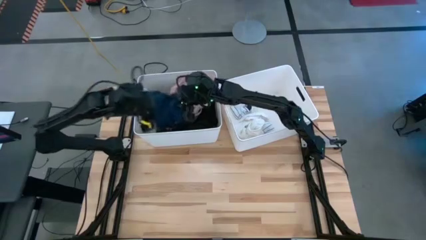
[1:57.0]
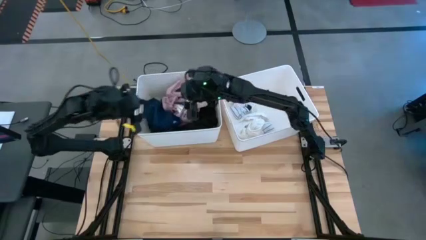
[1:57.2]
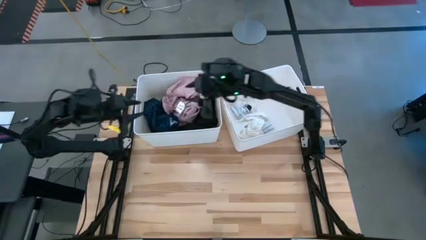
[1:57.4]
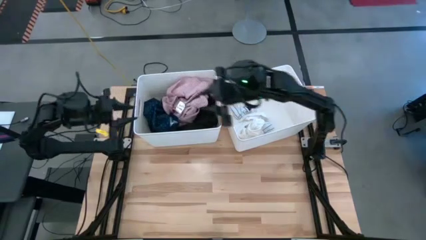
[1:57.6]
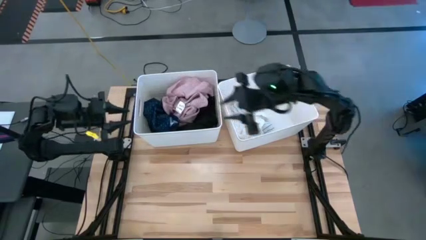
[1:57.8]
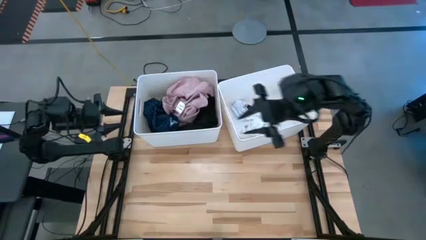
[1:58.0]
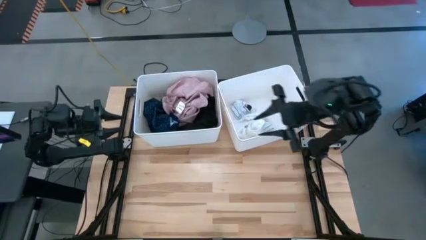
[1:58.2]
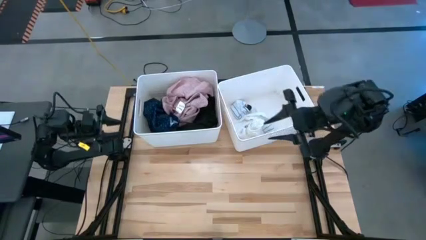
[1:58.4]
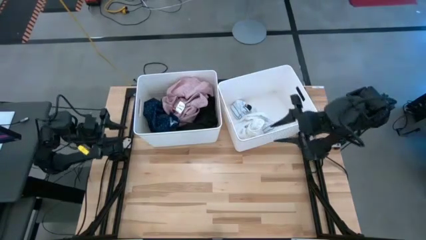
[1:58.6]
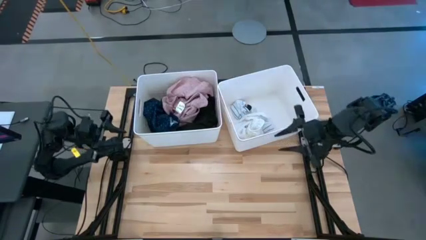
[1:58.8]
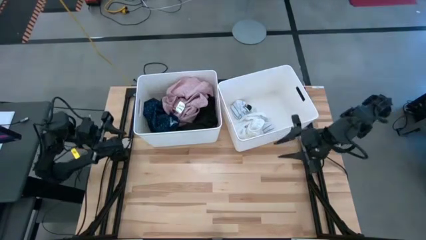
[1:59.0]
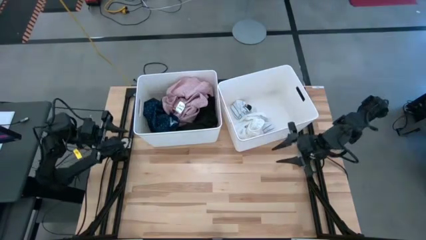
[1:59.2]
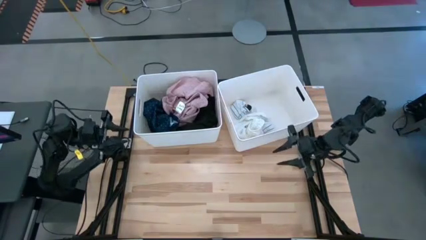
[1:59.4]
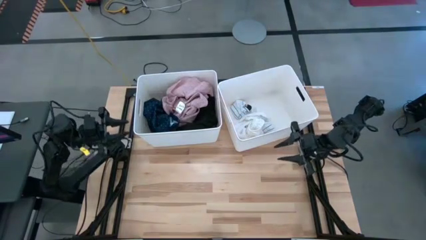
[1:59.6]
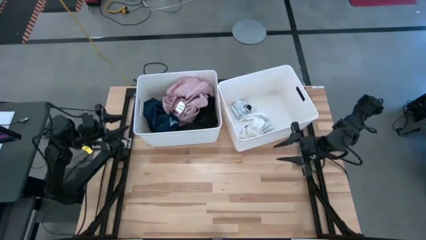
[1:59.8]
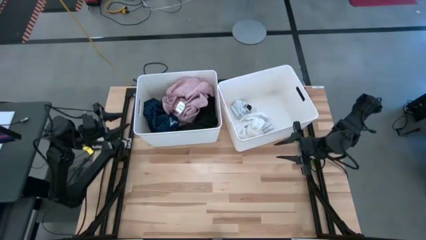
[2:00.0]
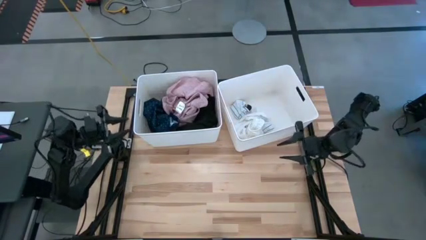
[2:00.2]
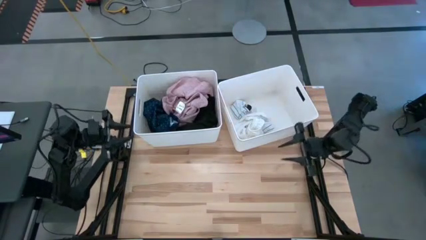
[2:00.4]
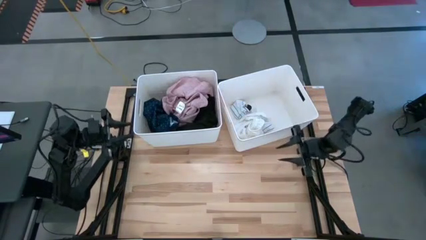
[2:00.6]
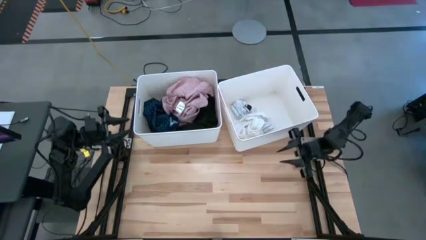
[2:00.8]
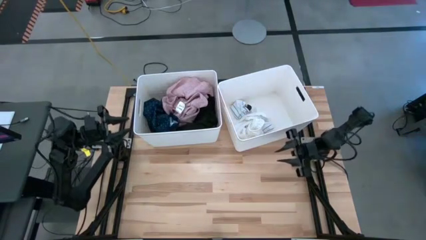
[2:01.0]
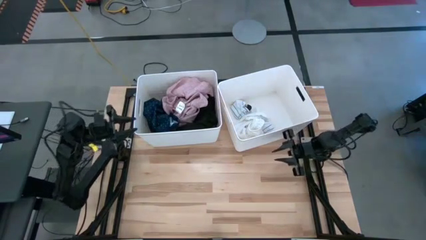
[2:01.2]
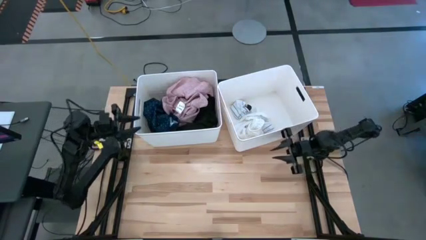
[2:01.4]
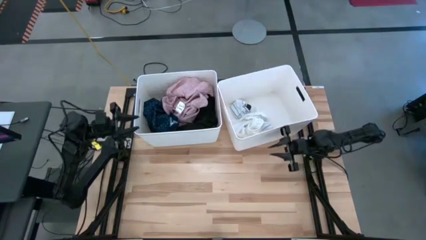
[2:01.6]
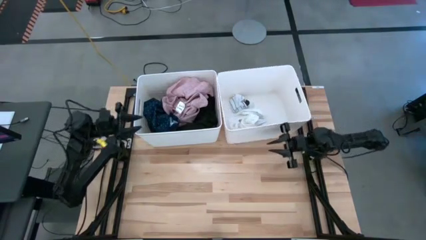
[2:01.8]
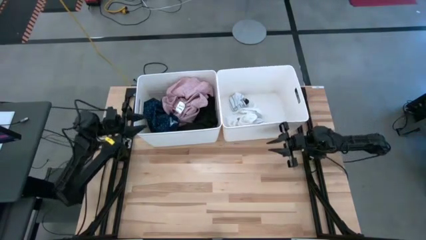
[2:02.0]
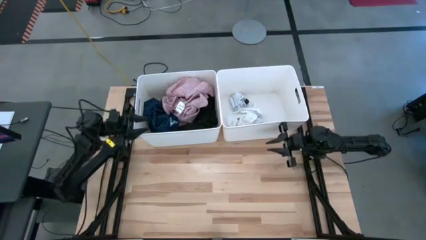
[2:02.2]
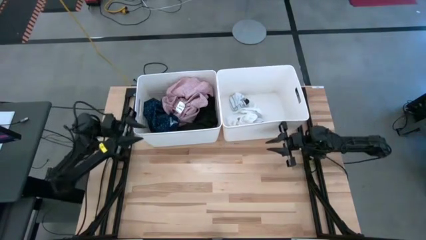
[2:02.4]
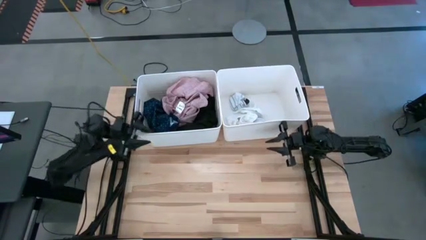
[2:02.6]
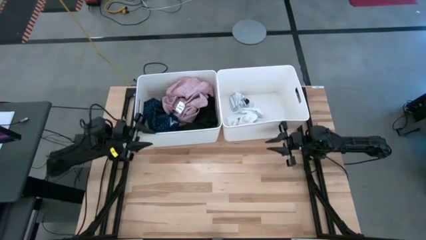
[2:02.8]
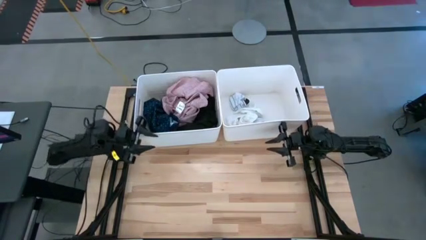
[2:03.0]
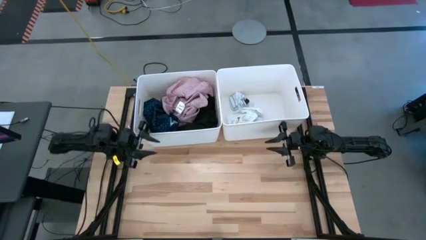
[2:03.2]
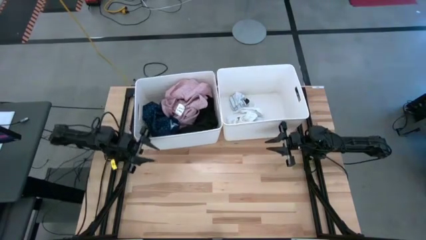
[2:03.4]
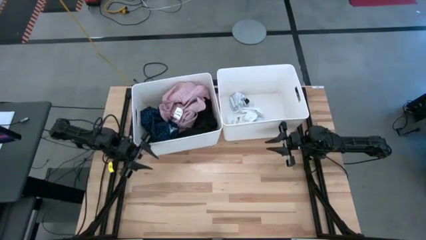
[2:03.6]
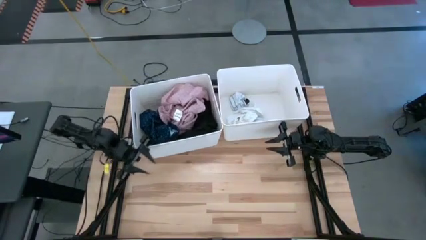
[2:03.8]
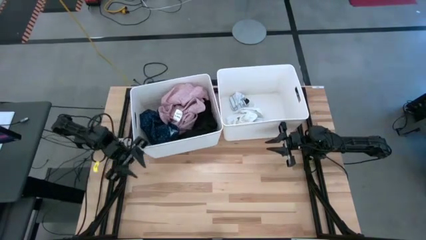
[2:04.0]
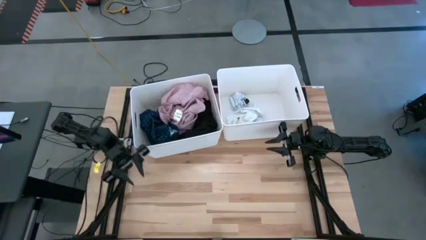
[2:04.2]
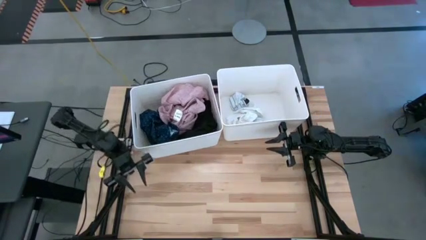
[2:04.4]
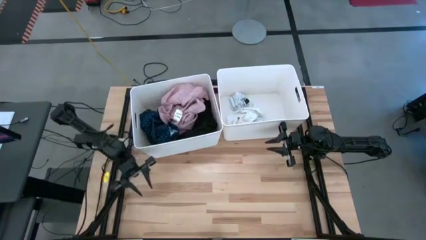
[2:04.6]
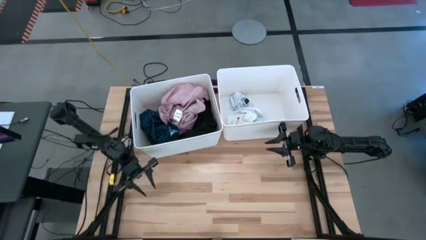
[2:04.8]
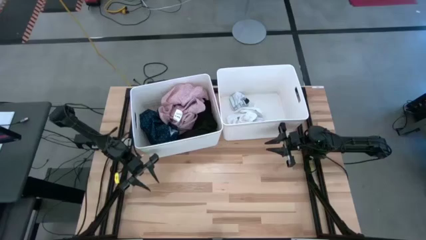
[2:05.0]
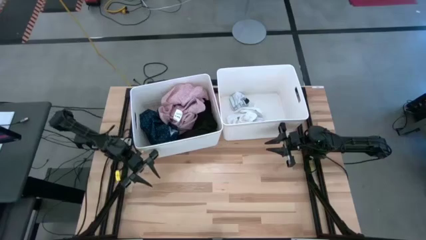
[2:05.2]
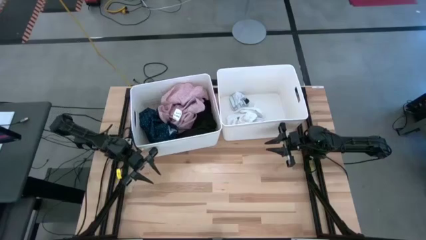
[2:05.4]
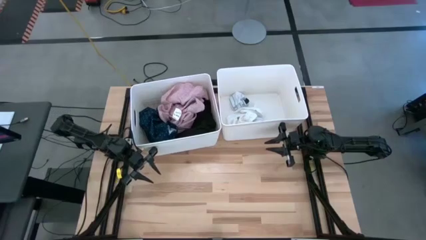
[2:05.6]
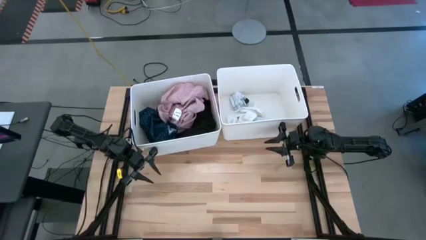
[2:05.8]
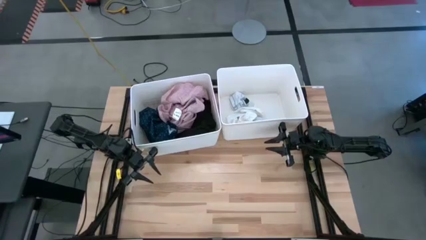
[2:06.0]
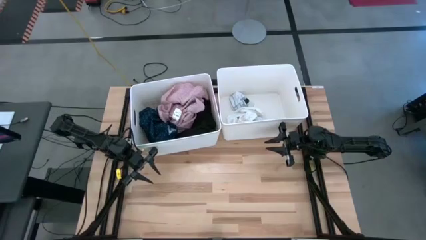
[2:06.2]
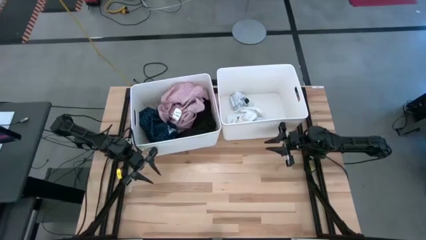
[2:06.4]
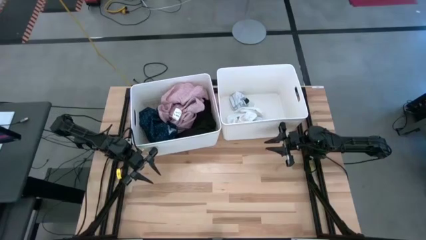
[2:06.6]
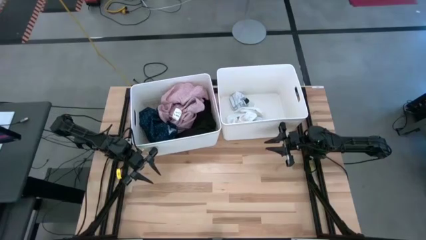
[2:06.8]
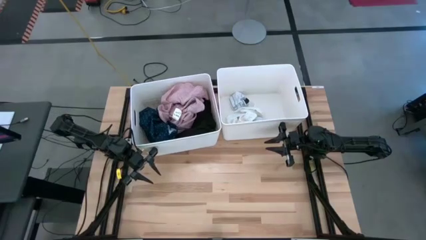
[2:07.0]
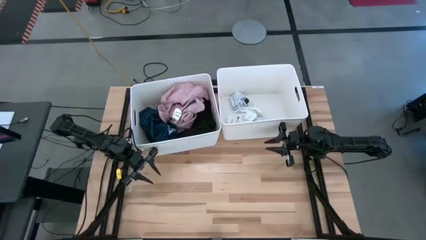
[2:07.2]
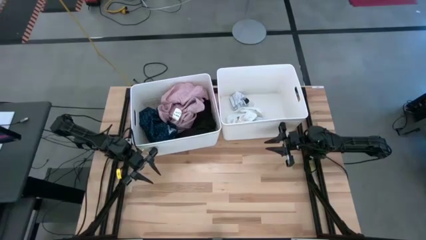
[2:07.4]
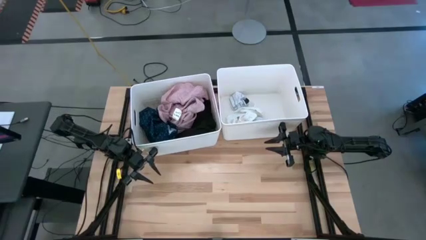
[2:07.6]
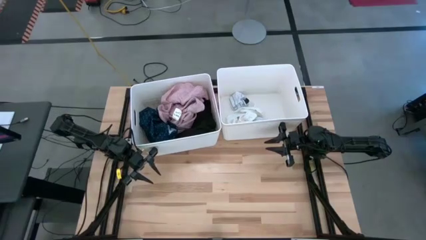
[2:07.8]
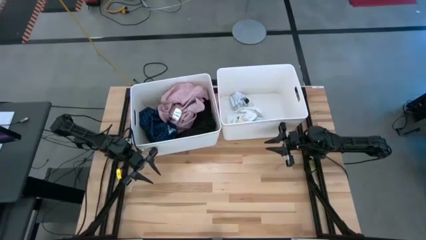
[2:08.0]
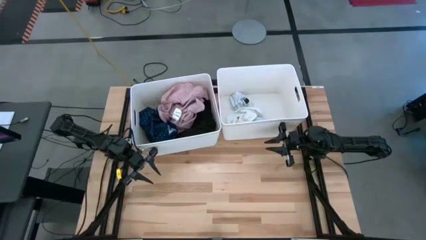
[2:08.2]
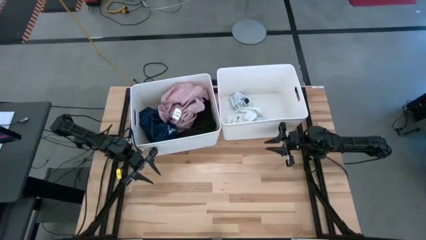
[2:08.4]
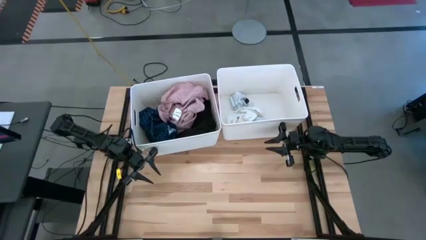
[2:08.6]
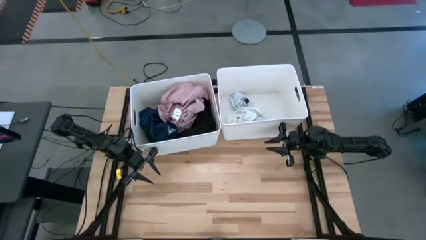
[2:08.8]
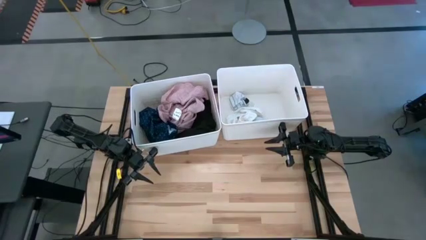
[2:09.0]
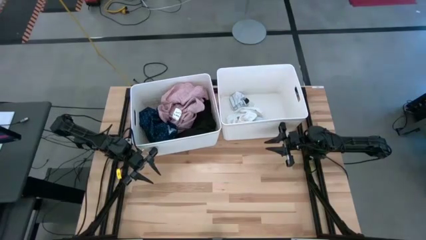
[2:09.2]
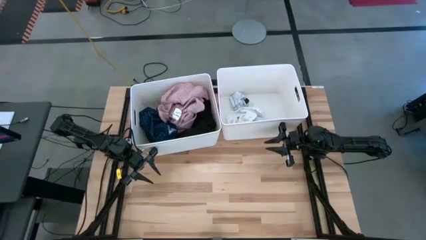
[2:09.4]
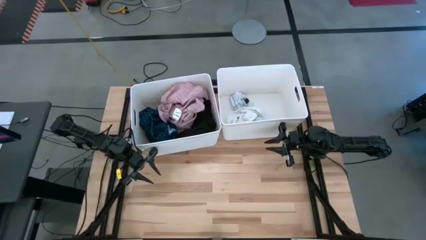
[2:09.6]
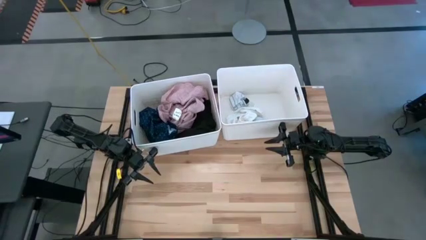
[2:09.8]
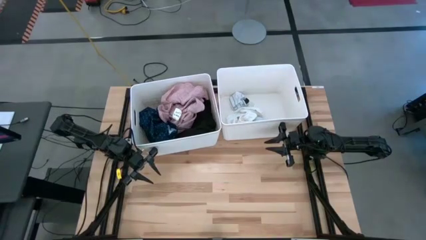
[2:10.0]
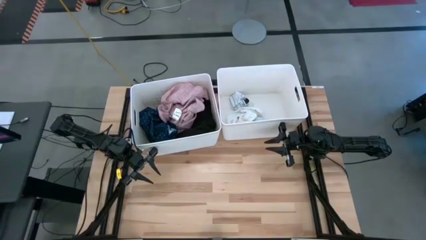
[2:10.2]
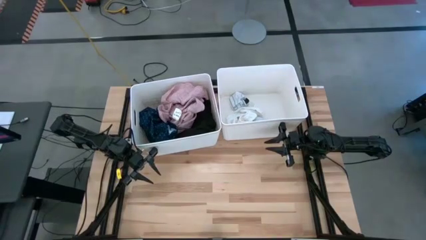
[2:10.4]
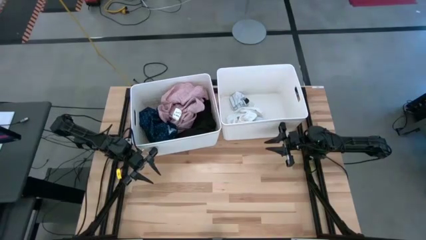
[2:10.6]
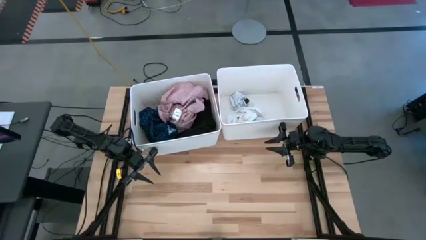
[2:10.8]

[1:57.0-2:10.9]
Task: Sort clothes
Return to Home Position
